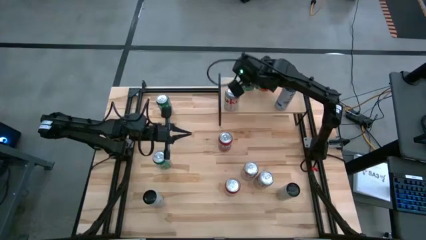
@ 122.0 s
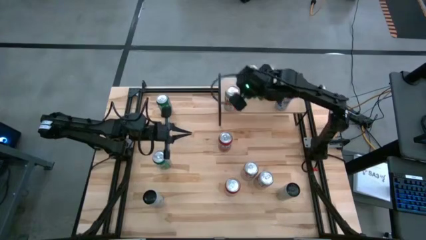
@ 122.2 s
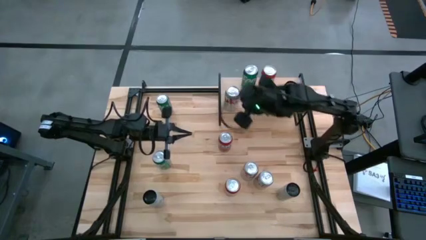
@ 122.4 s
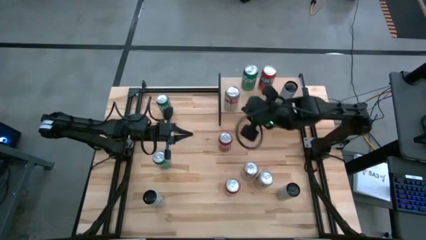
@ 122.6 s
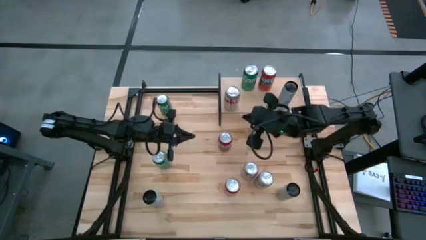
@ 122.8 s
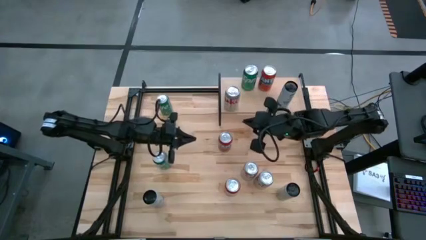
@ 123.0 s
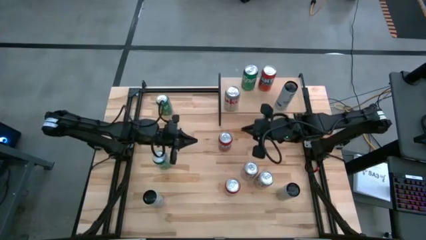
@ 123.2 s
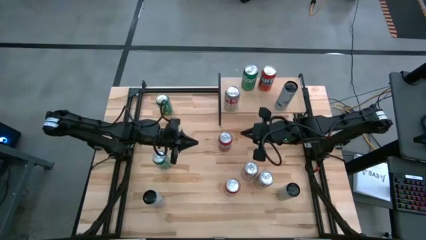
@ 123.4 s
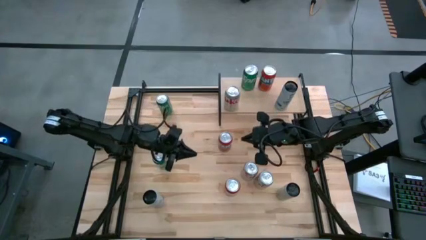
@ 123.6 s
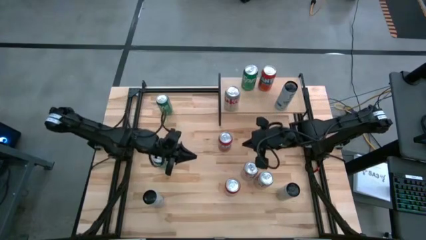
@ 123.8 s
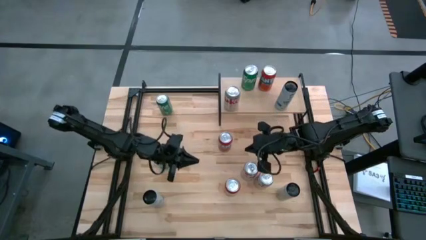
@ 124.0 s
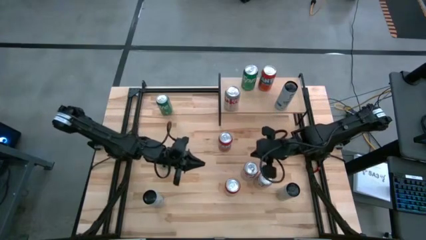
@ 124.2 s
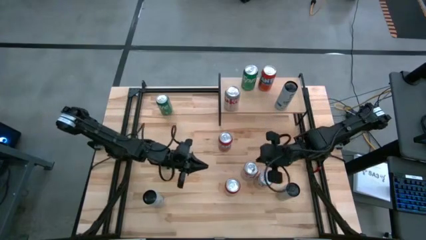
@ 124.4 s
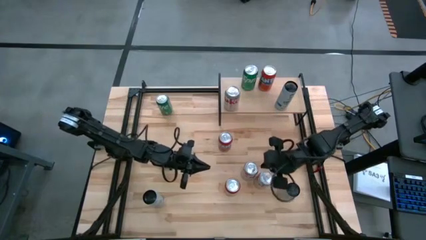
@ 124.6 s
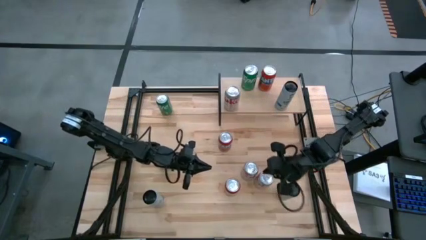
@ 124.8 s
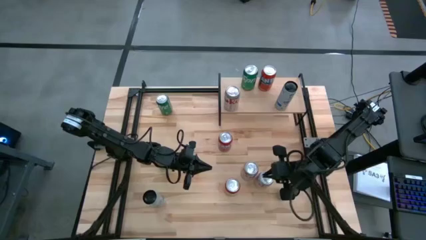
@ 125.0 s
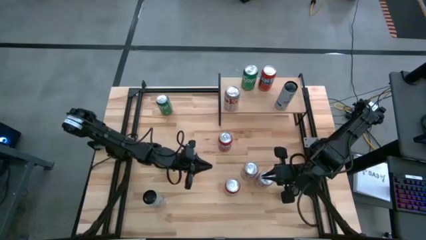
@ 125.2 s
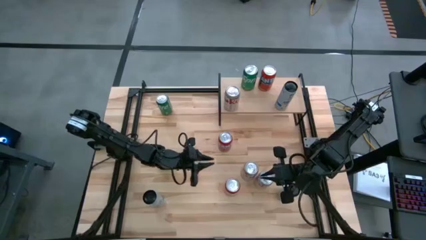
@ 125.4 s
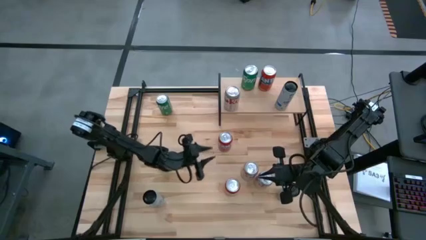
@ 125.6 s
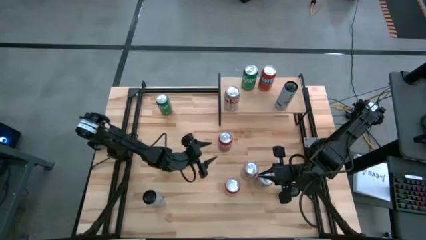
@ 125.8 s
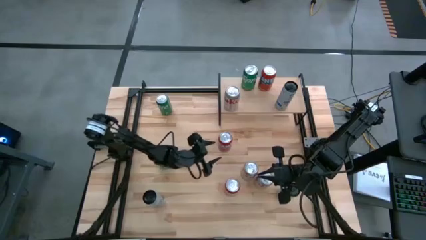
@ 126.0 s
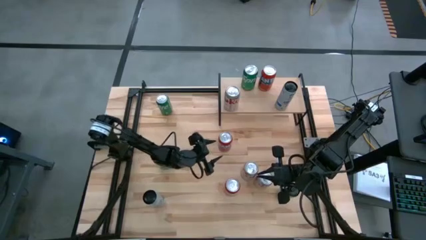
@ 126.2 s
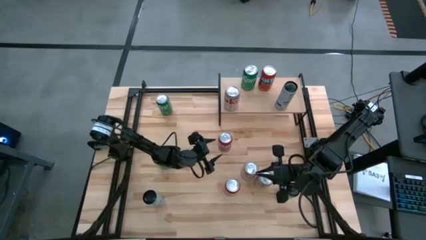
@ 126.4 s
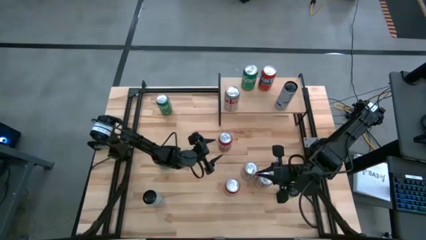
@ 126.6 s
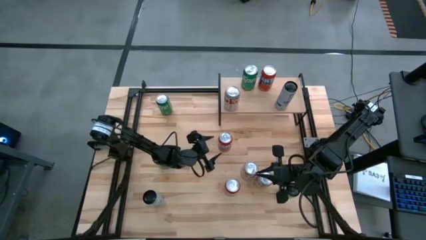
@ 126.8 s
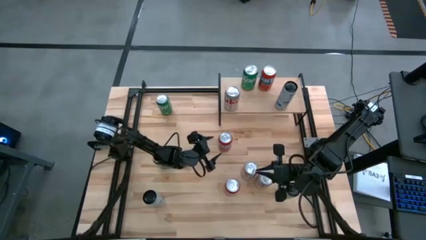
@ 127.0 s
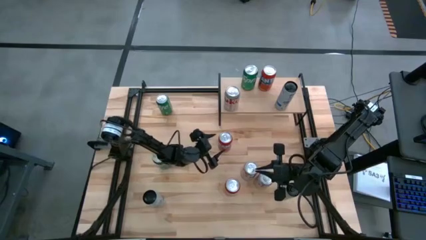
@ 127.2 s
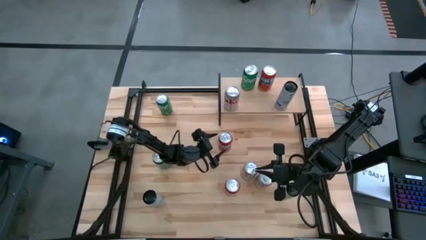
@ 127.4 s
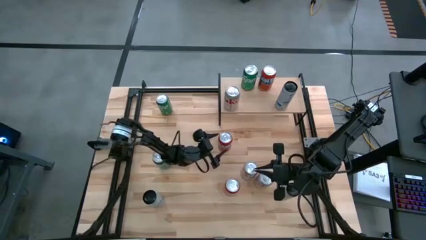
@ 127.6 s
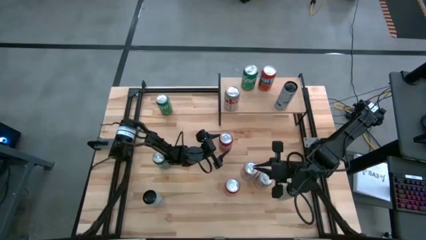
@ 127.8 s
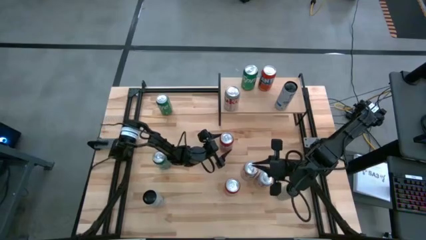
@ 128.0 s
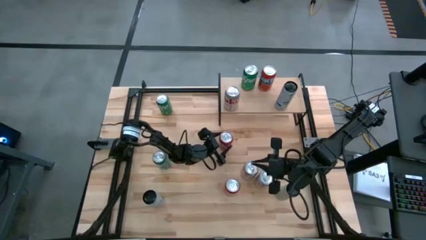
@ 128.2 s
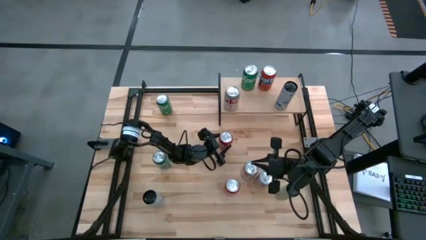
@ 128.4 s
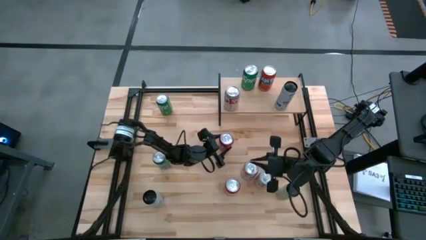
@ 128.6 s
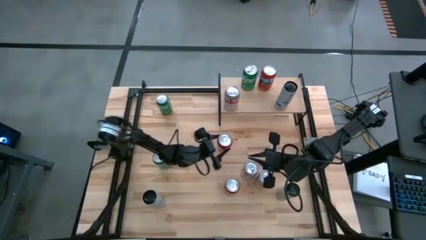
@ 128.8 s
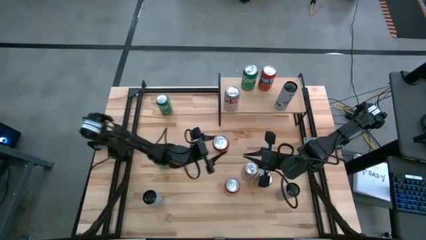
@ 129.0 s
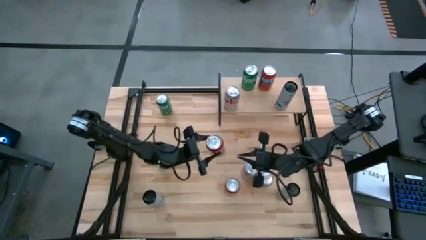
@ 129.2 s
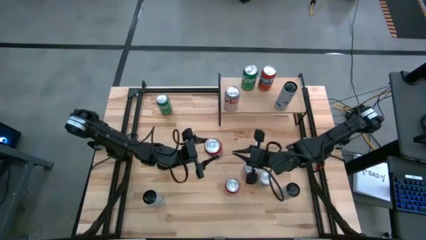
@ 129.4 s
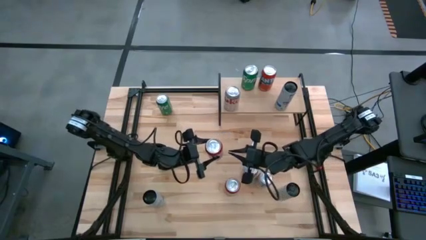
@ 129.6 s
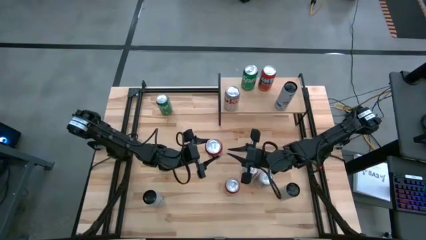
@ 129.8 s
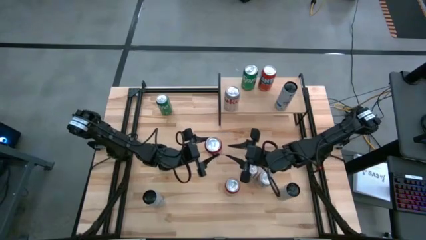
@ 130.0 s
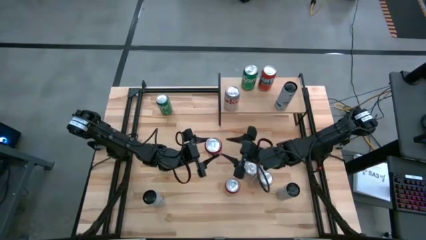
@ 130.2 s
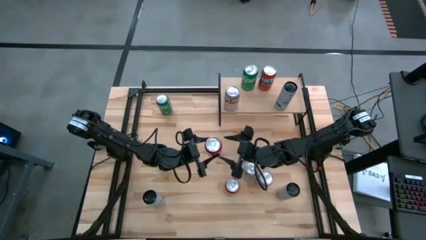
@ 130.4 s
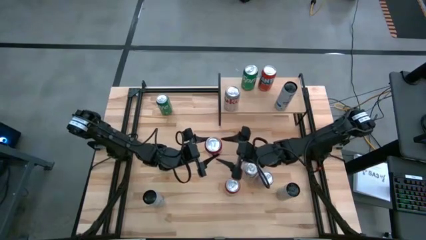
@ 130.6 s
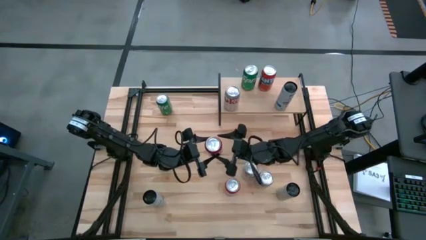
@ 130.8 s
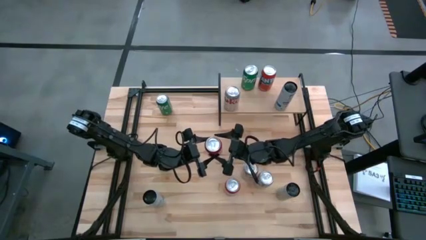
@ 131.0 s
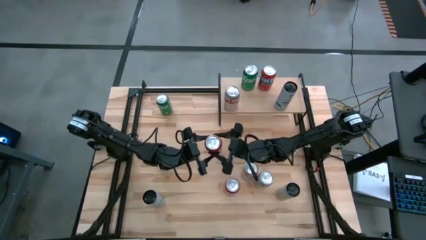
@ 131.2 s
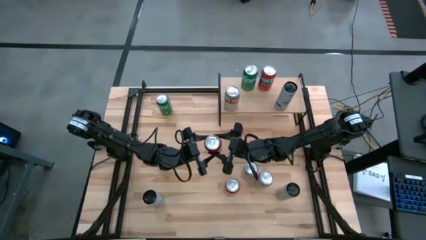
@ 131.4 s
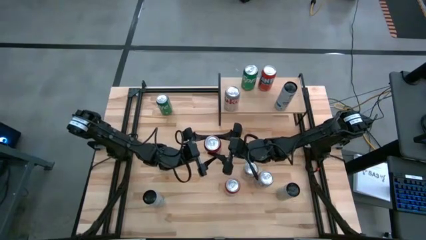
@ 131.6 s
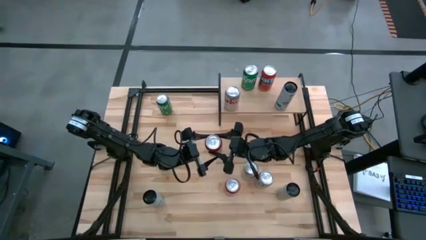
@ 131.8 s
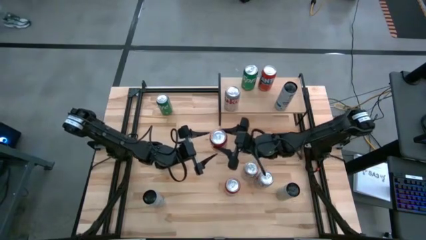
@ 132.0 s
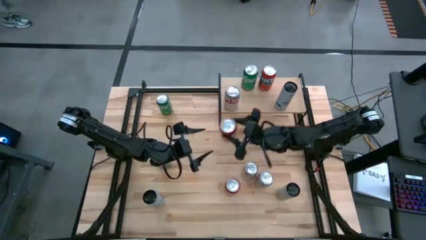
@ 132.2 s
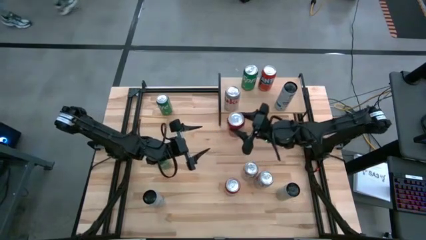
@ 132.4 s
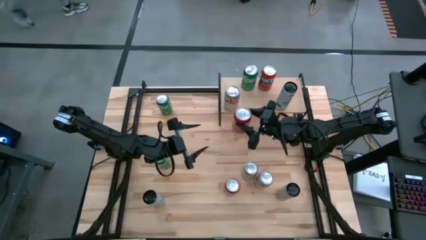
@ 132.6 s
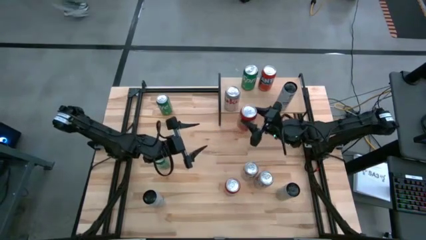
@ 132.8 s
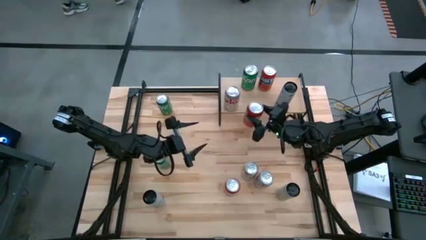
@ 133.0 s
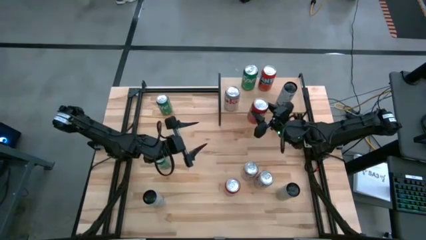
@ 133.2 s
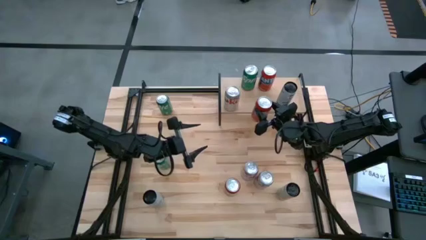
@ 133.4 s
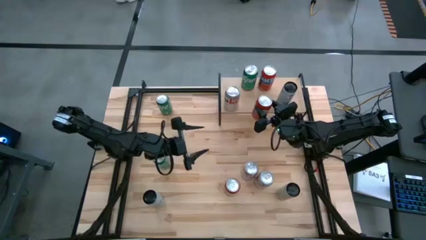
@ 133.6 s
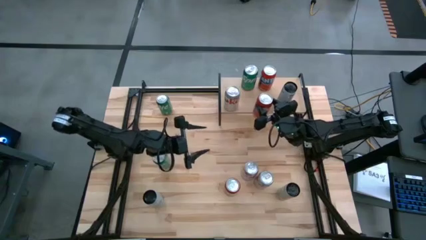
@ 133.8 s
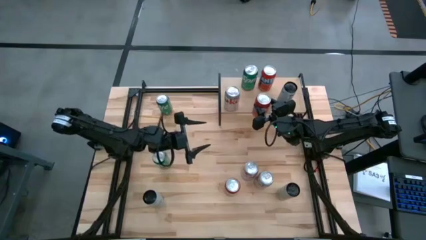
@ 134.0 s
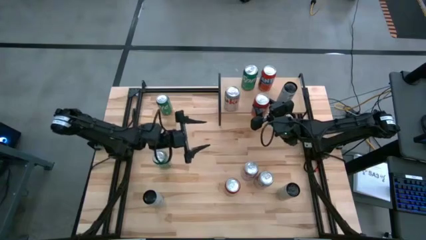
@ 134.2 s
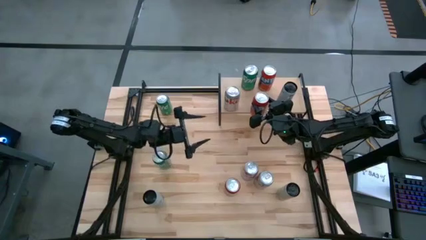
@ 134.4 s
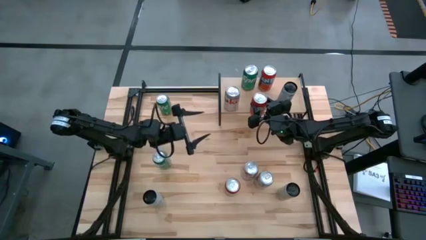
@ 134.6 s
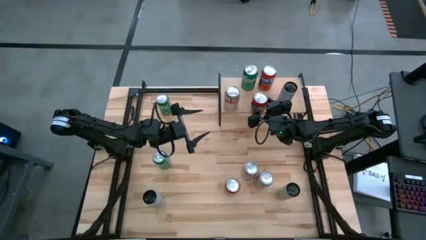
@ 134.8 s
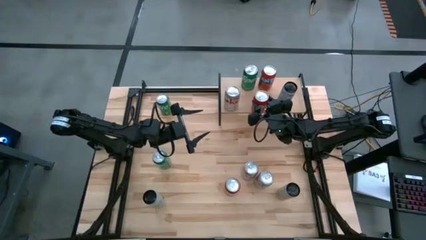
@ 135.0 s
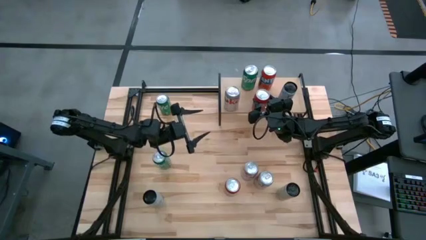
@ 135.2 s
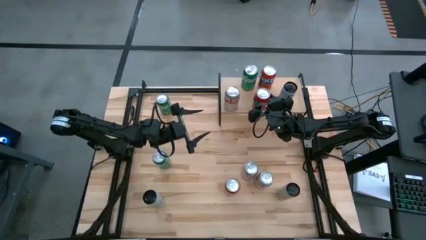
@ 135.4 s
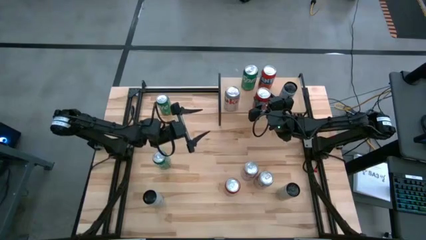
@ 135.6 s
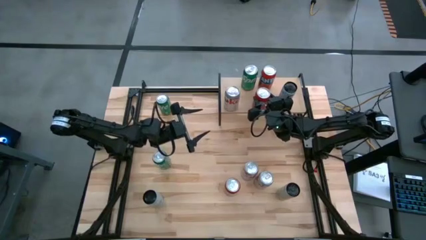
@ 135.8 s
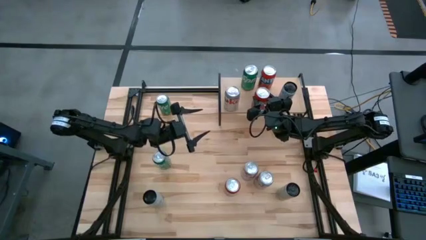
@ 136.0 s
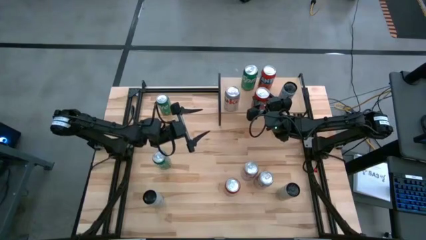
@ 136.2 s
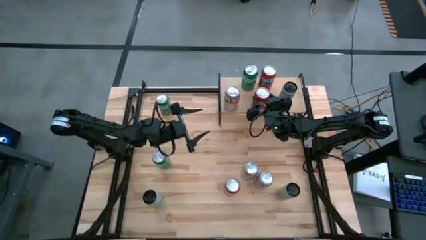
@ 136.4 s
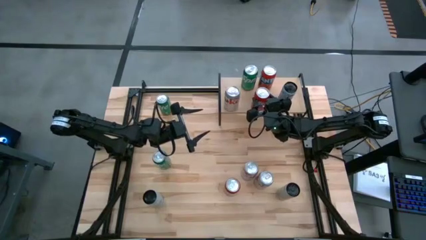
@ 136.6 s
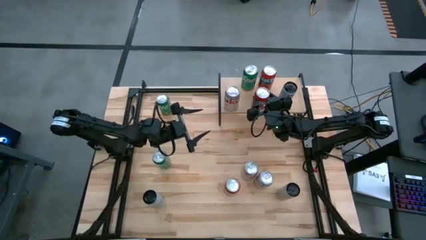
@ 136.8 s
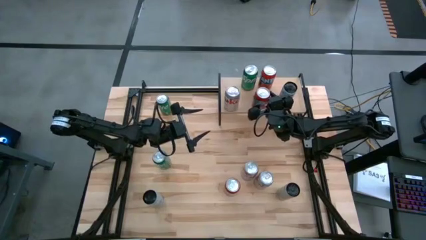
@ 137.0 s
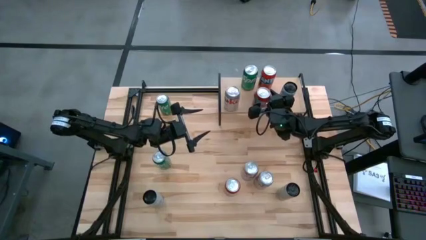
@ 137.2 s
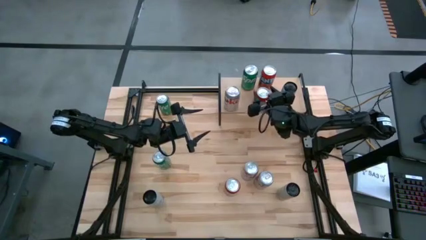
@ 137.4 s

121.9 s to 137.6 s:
Task: Place canned beverage on shelf
Put the top orange soda can on the shelf aligned in front of the other orange soda can
